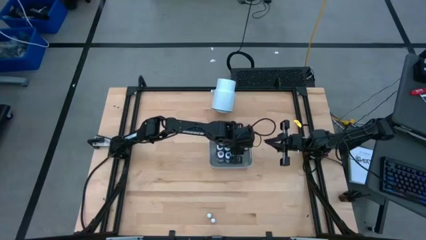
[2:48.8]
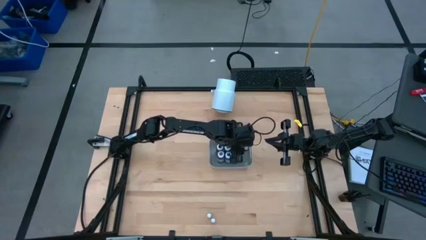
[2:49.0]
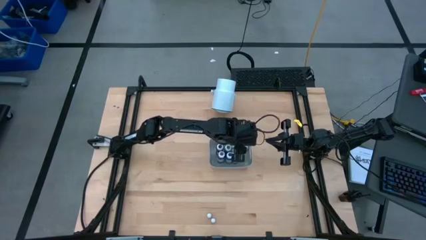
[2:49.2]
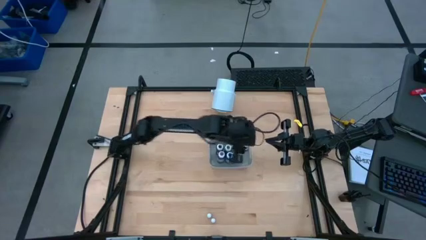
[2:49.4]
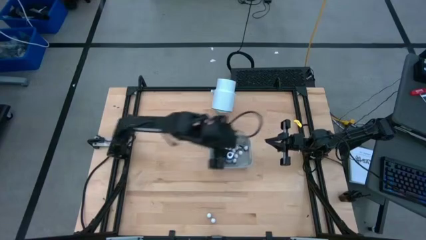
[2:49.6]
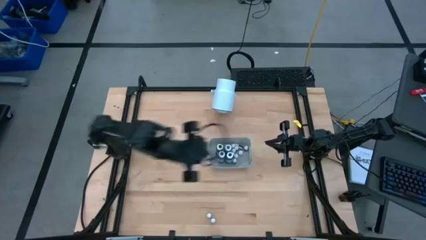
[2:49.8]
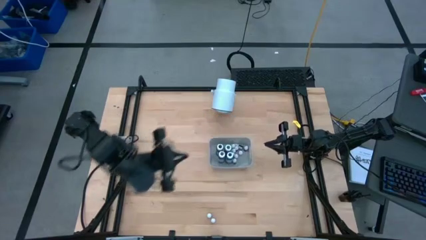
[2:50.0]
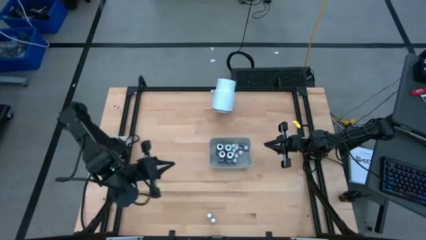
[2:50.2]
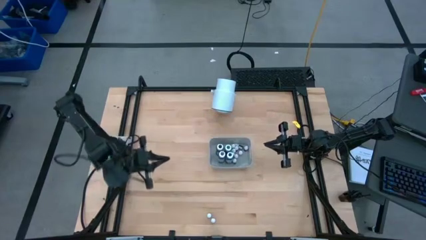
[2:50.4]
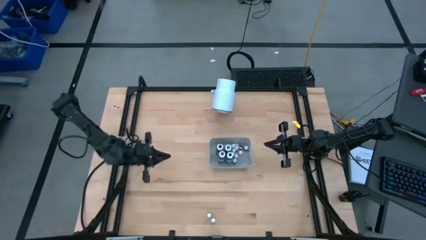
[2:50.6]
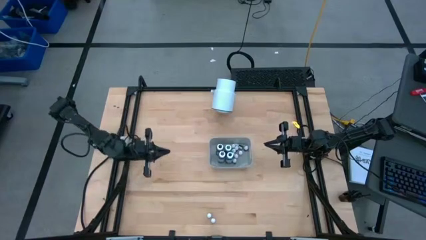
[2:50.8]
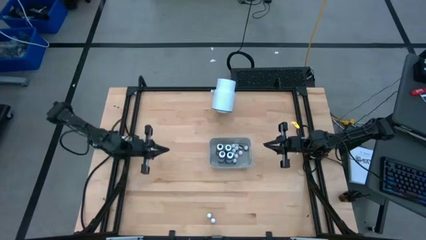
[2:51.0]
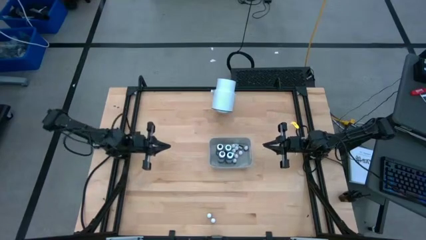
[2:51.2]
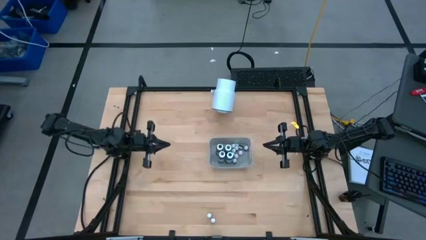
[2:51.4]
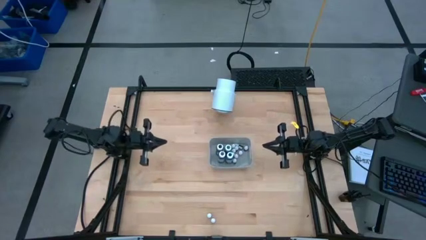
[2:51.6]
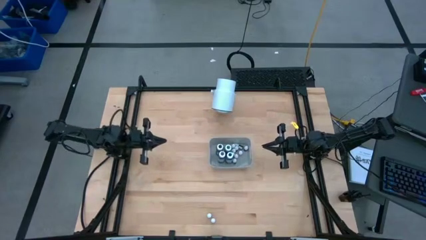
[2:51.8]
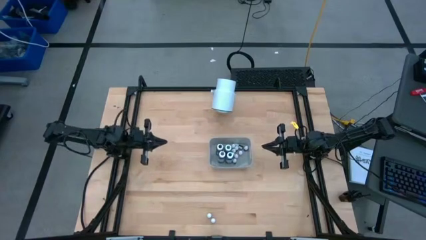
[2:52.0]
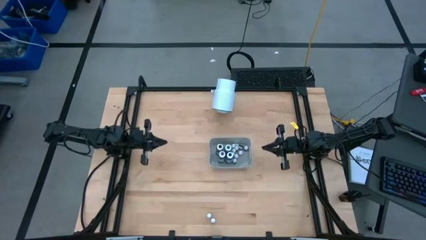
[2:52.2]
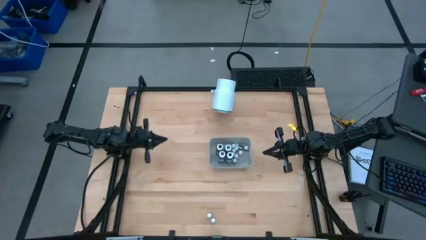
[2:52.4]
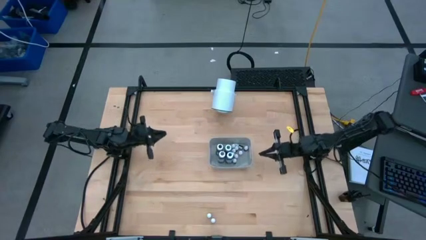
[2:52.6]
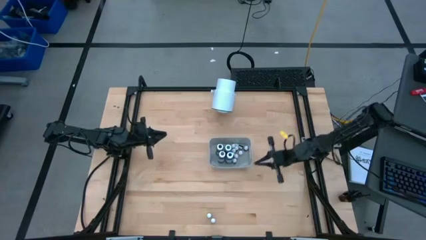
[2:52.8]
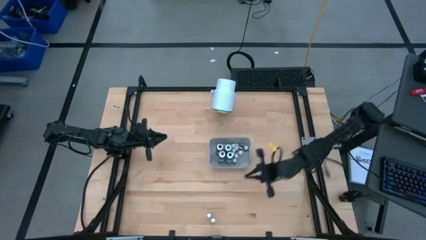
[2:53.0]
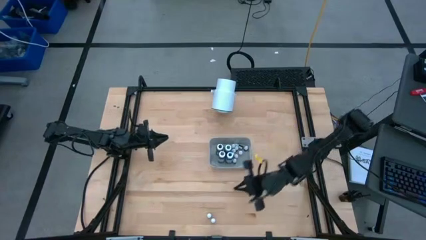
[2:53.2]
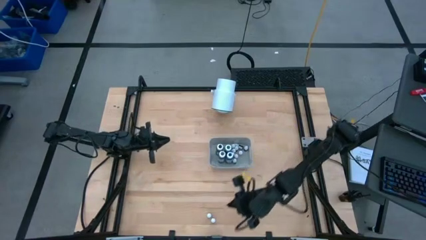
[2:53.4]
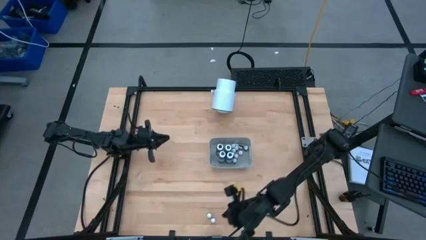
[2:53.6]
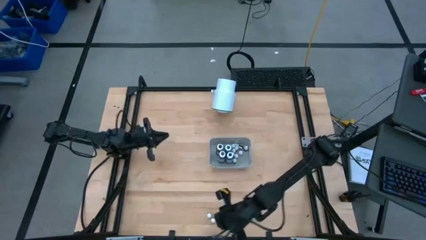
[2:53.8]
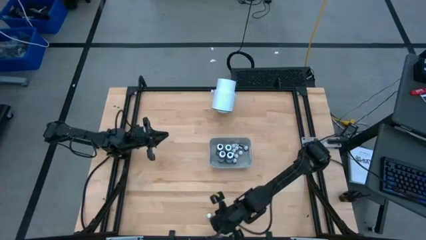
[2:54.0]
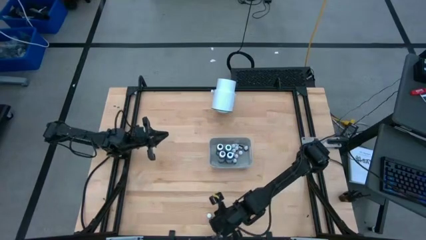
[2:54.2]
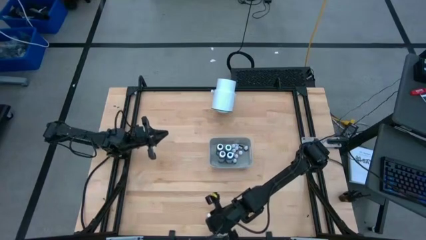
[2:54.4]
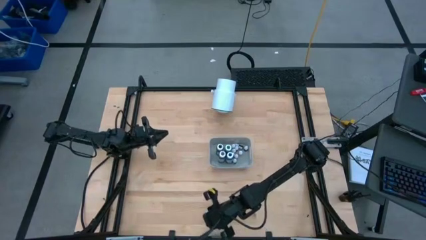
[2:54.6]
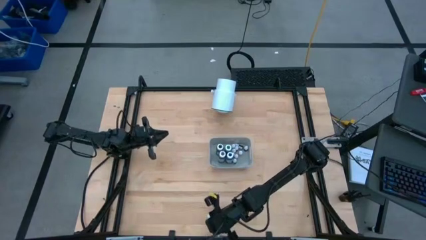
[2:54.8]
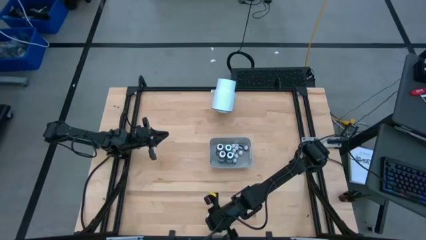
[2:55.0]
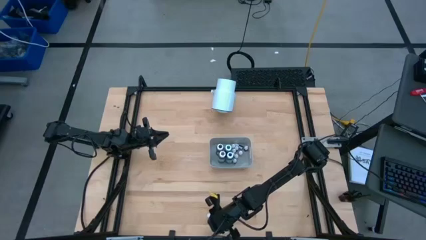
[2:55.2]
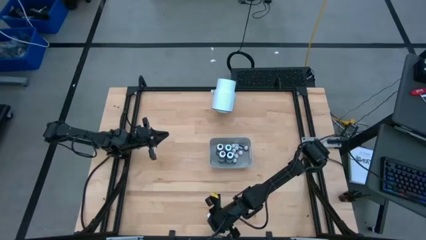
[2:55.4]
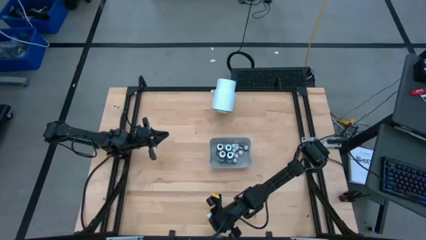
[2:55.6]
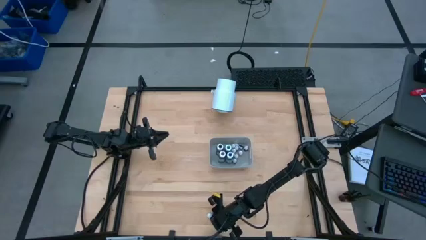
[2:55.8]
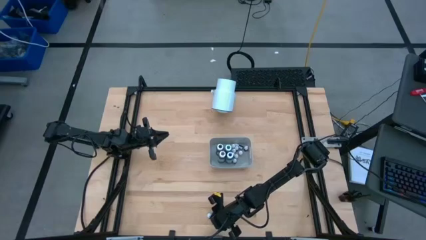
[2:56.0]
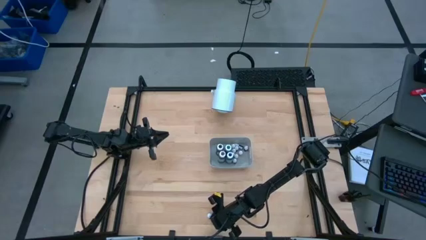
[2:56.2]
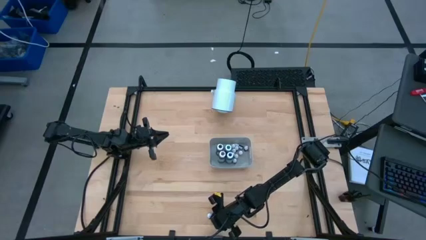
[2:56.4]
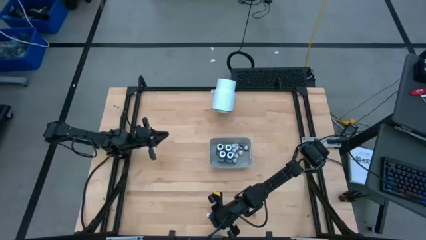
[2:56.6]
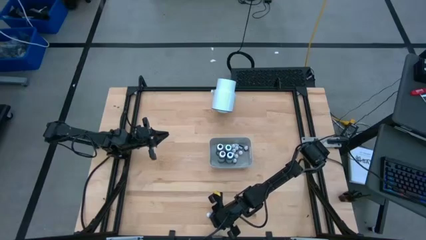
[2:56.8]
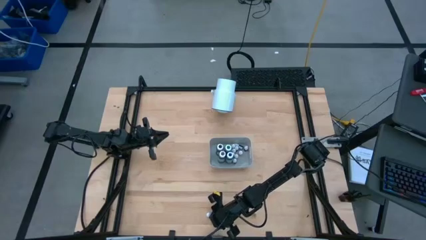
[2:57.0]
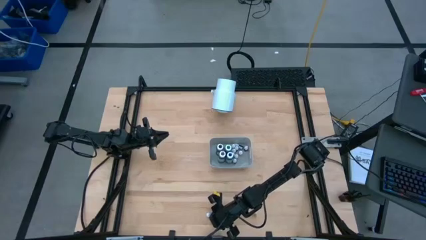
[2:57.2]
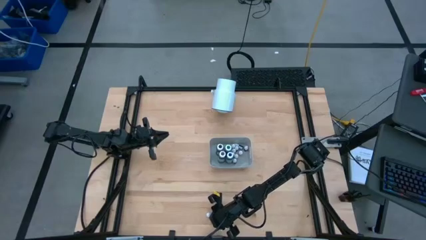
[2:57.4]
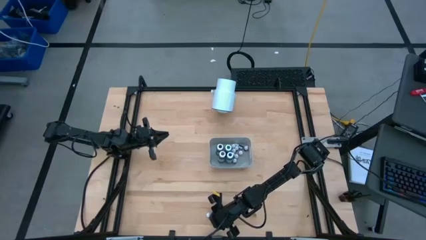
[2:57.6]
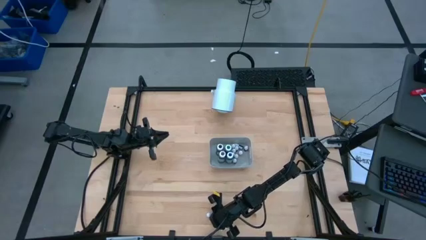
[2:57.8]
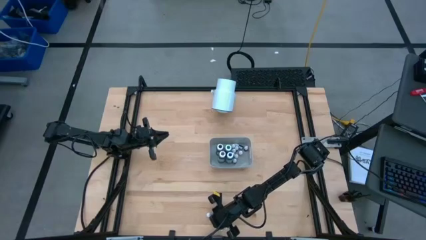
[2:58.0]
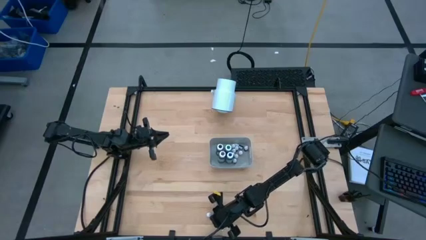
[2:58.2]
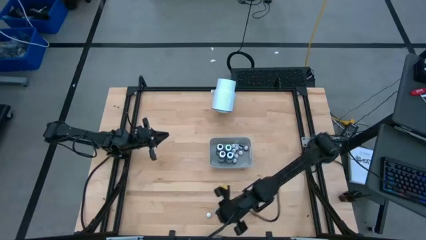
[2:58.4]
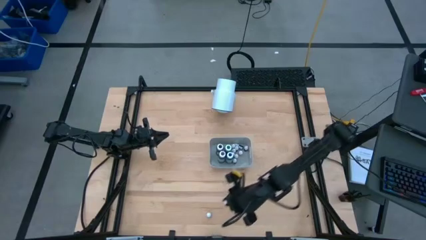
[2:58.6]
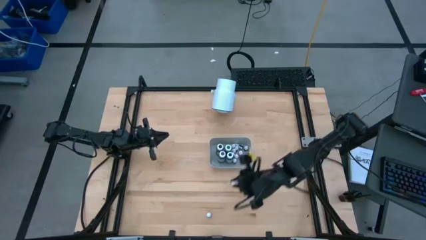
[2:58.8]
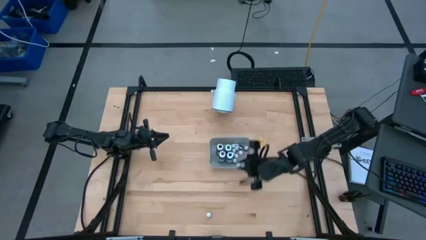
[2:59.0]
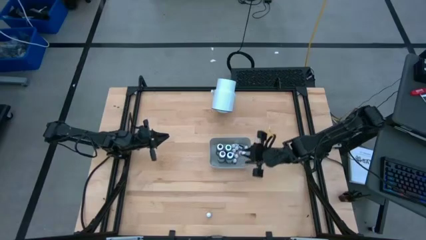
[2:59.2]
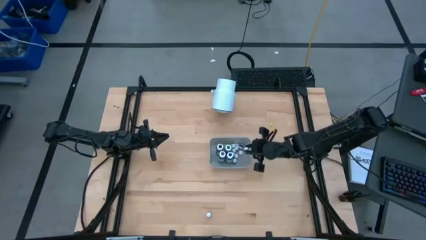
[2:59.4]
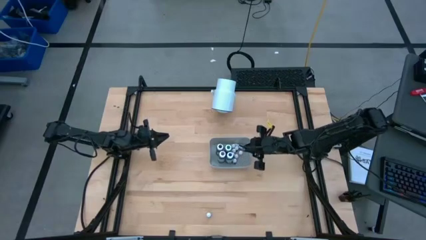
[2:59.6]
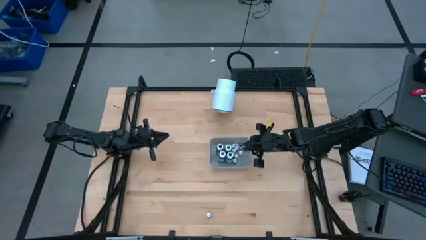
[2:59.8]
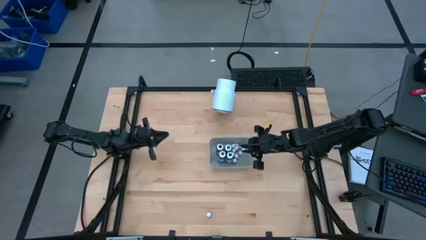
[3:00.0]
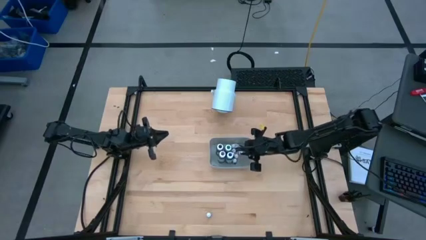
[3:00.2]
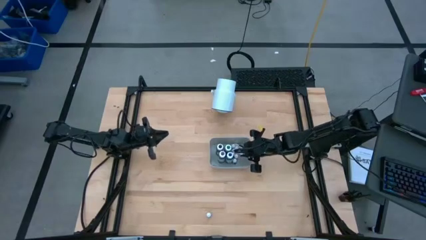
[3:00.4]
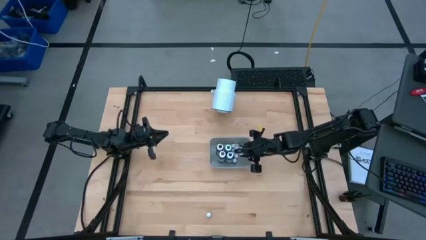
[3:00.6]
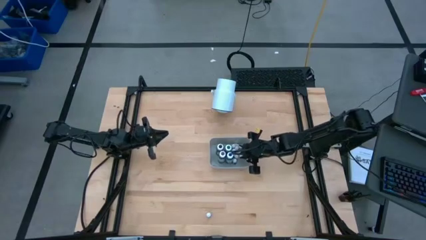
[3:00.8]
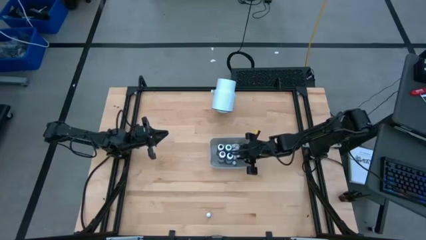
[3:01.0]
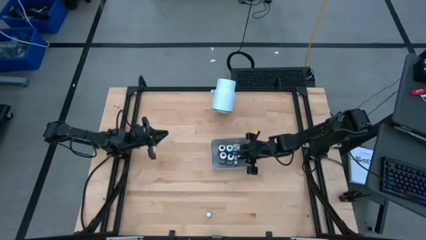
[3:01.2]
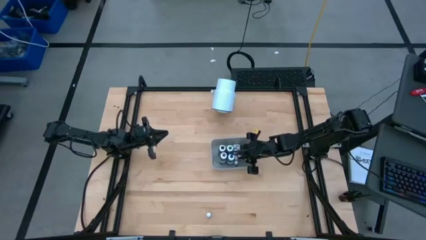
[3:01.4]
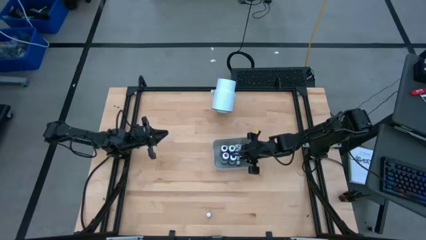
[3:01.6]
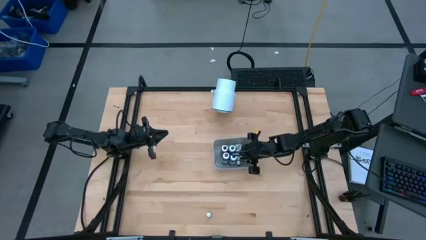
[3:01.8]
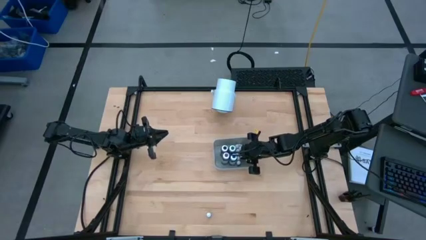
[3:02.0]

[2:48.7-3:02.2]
Task: Pick & Place food coloring
Put the small red food coloring bottle into the gray bin

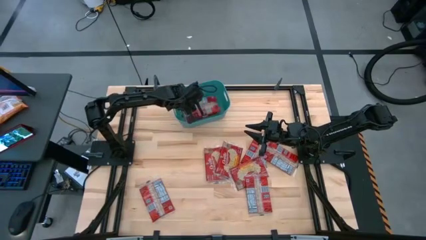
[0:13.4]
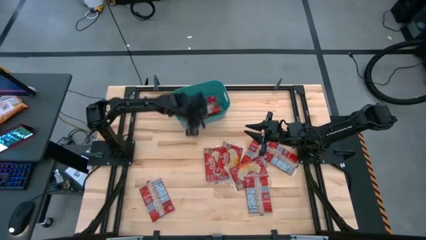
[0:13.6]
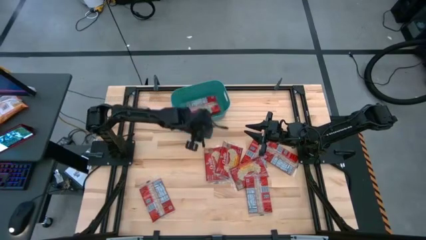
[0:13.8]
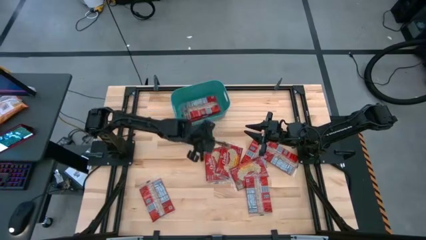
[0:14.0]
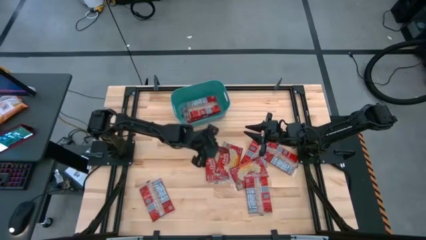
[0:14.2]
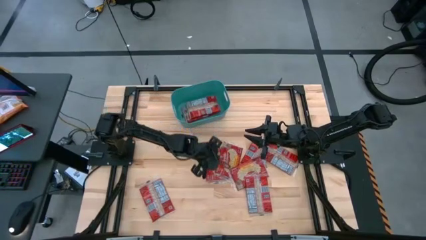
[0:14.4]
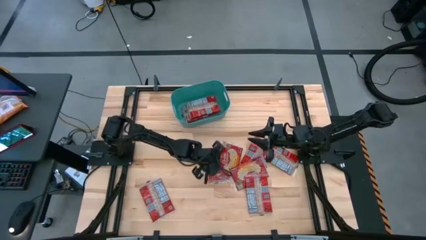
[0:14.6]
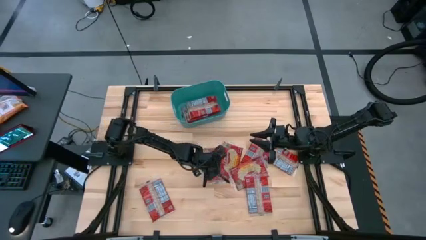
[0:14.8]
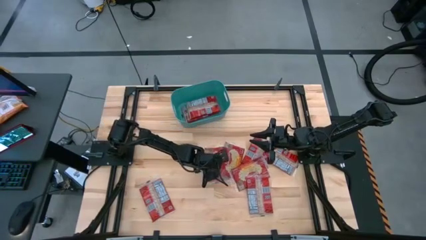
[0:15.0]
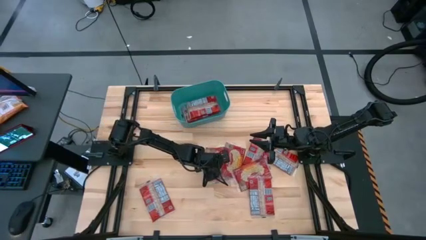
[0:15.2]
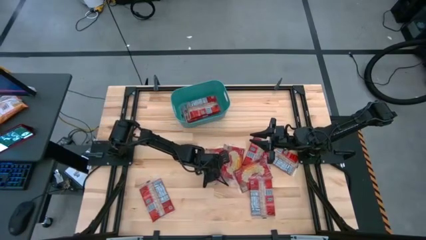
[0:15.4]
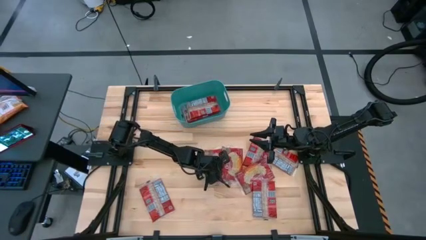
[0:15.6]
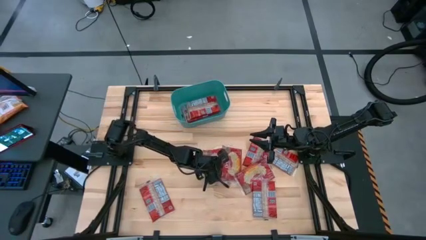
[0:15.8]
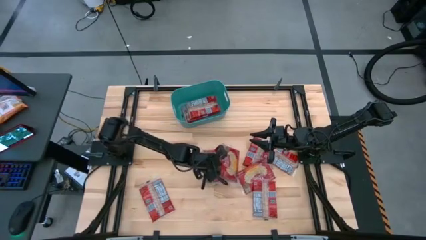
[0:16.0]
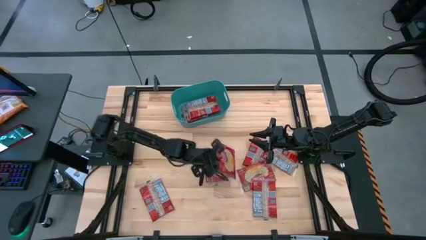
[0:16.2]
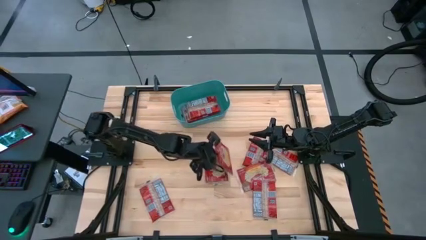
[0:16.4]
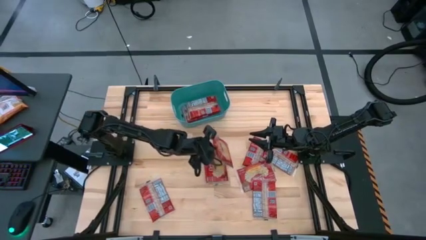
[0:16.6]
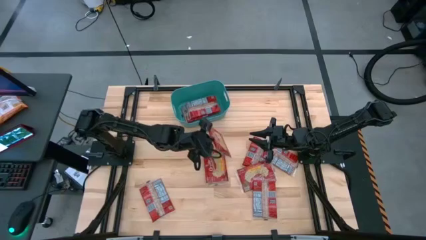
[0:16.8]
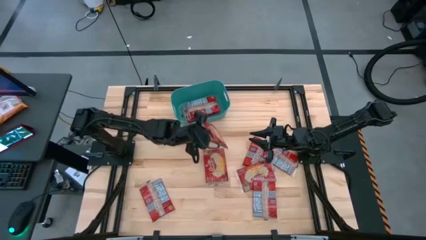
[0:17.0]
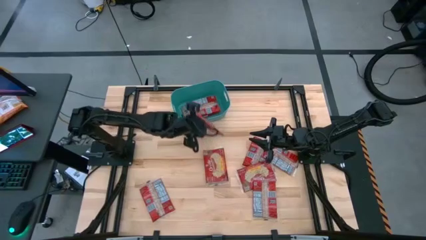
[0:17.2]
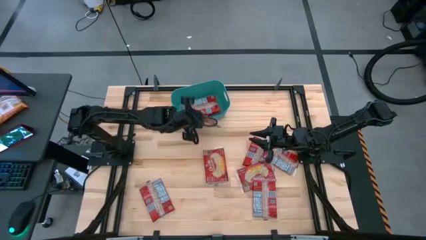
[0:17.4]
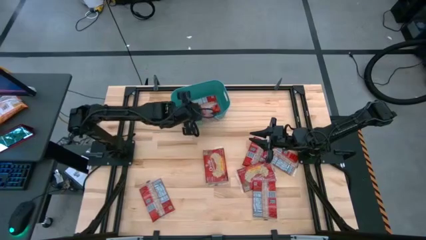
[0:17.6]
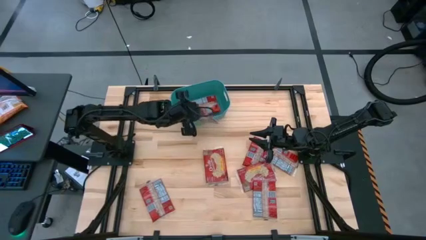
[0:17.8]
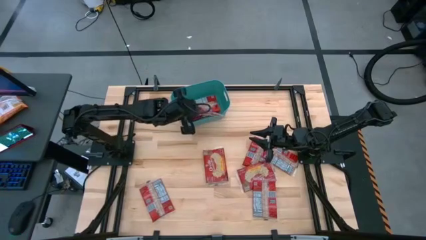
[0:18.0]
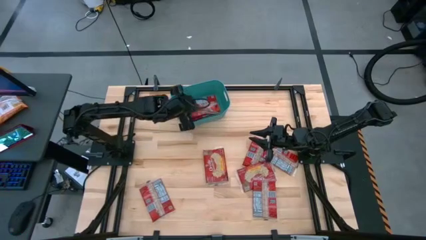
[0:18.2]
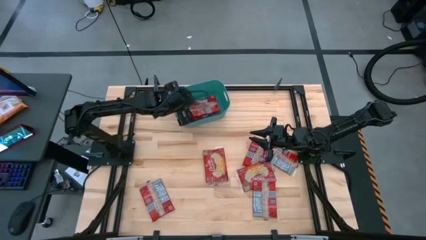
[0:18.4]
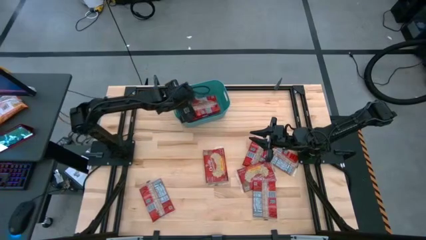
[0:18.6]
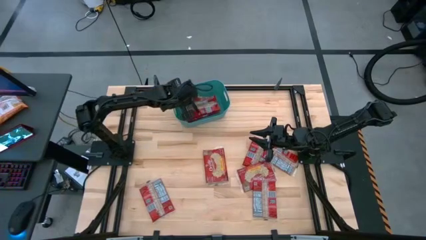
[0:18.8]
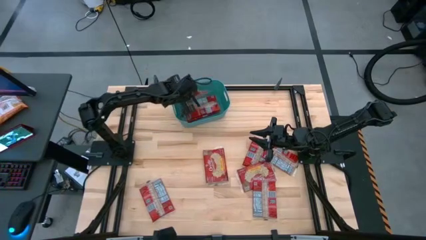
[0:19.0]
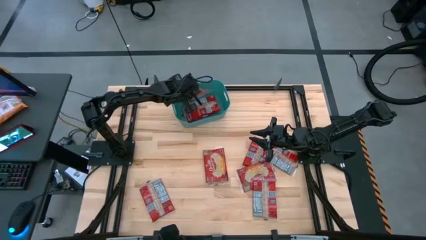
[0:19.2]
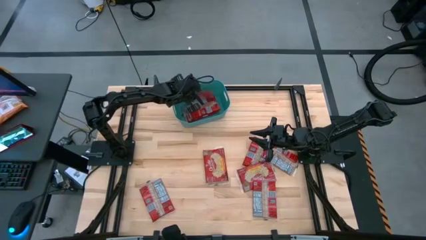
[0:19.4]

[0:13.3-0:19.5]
Task: Sort popcorn bags into baskets
Put the red popcorn bag into the green bin
